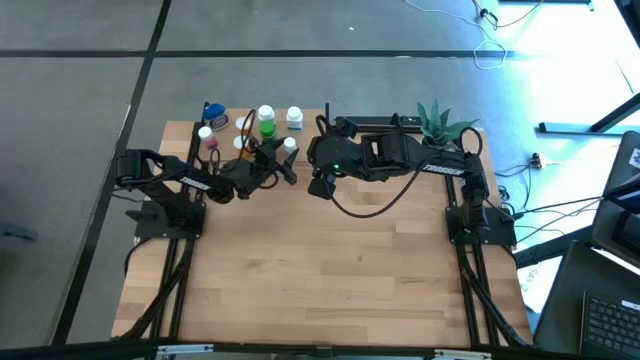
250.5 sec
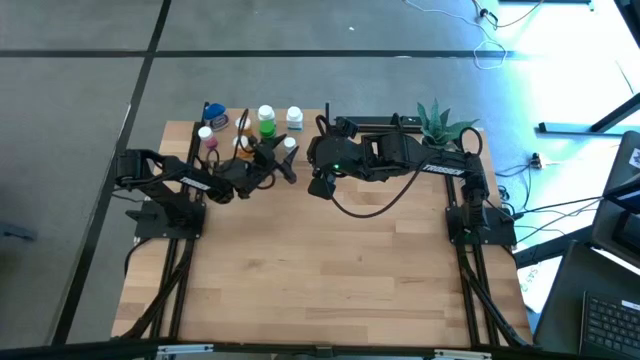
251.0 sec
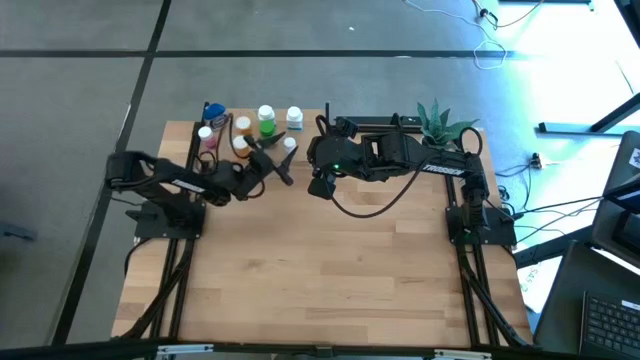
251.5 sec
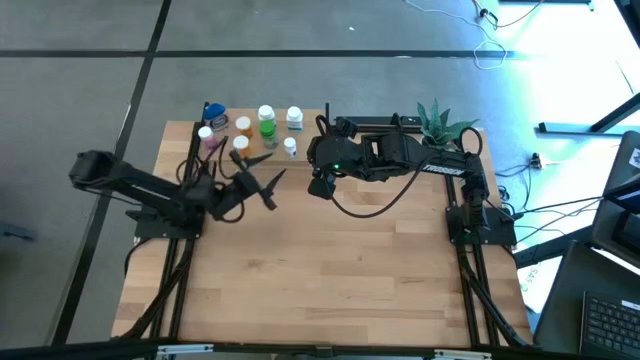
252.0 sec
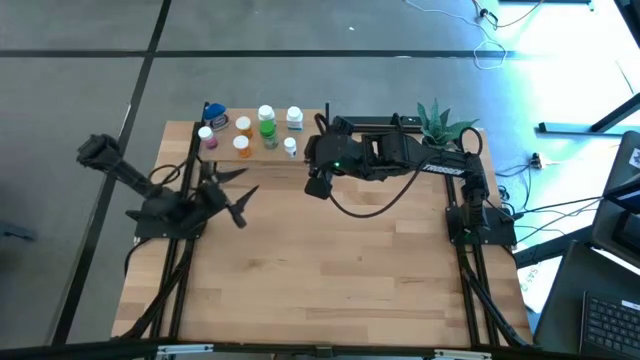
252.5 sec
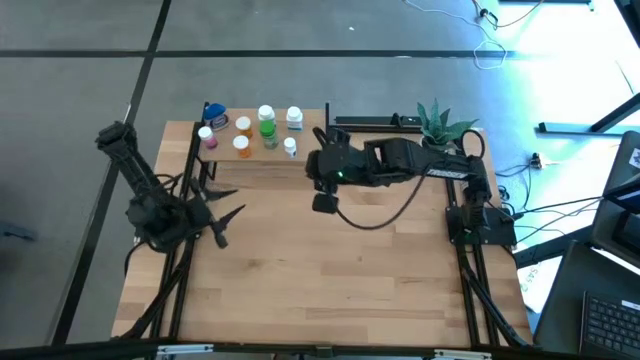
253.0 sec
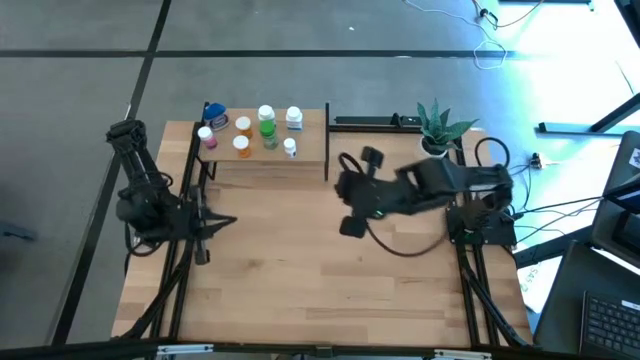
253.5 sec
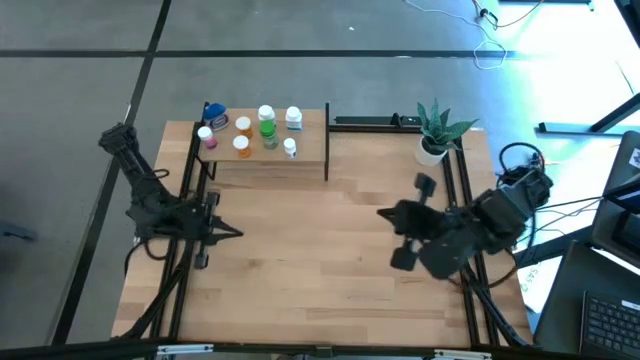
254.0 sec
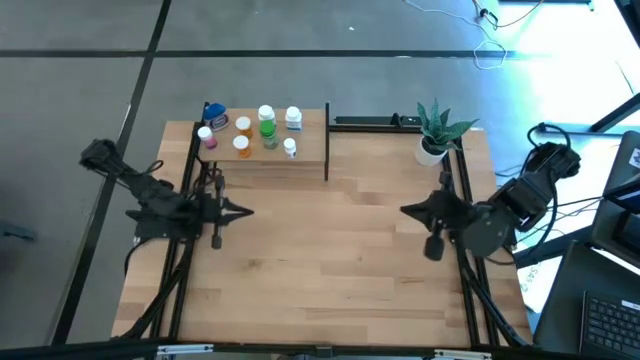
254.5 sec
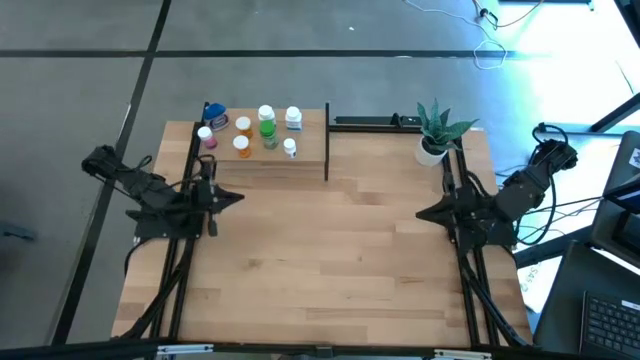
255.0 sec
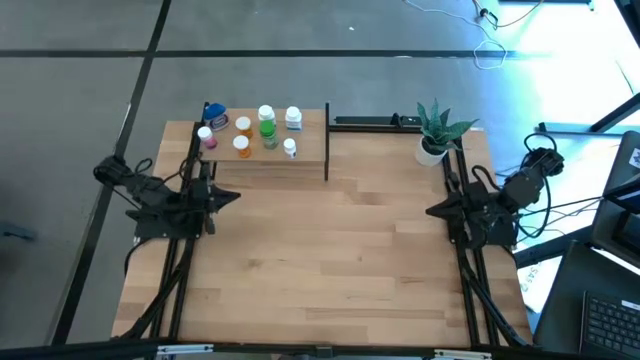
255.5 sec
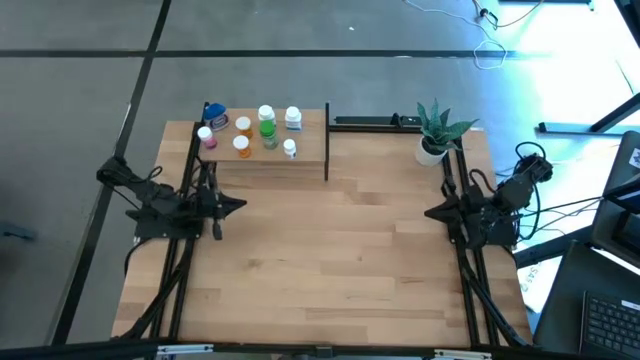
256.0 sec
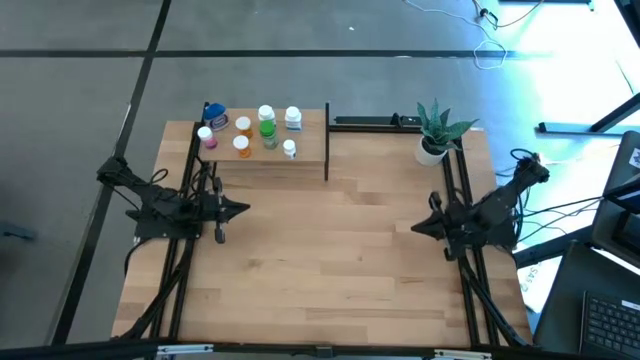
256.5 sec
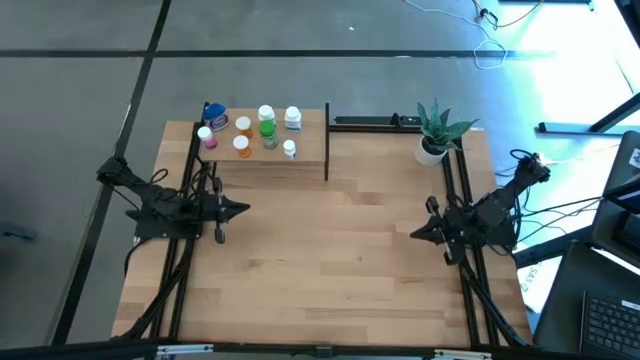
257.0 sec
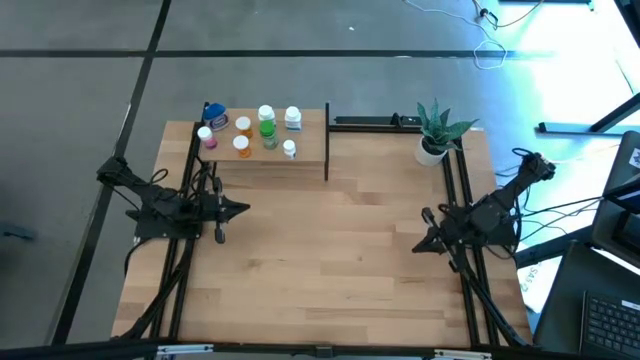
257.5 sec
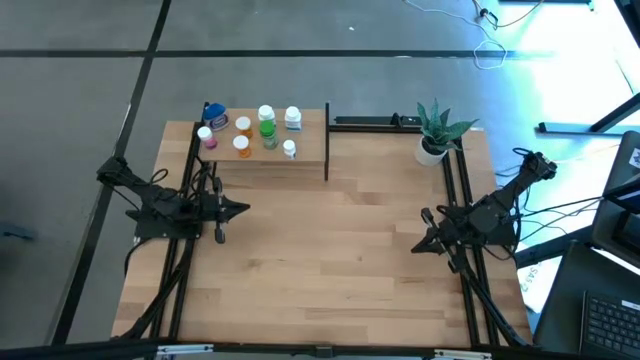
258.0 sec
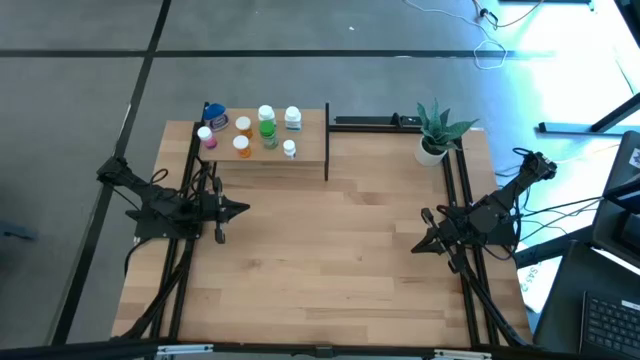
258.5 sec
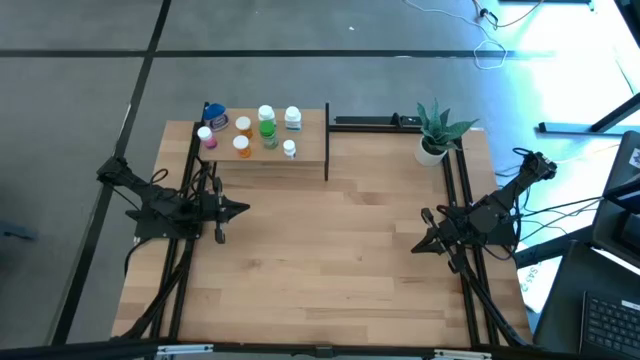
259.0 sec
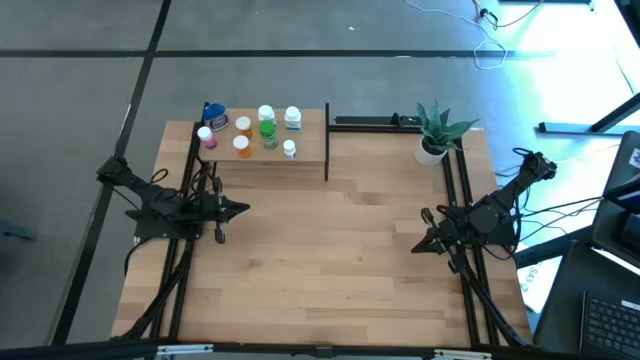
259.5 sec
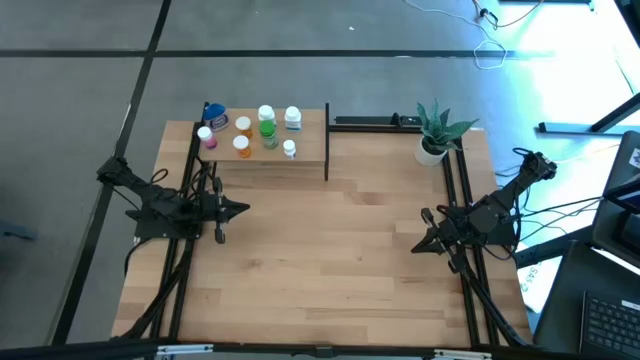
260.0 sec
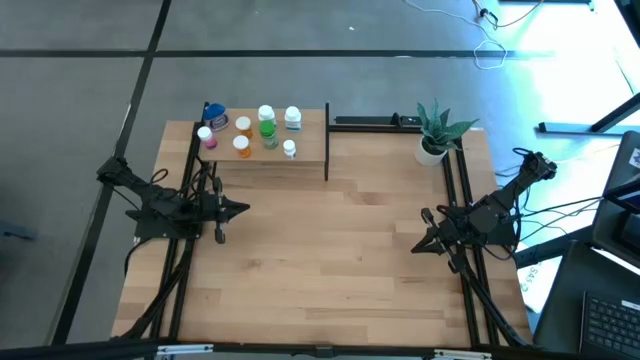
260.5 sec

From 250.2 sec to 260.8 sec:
Task: Pick and place medicine bottles onto shelf by color
Return to Home Position

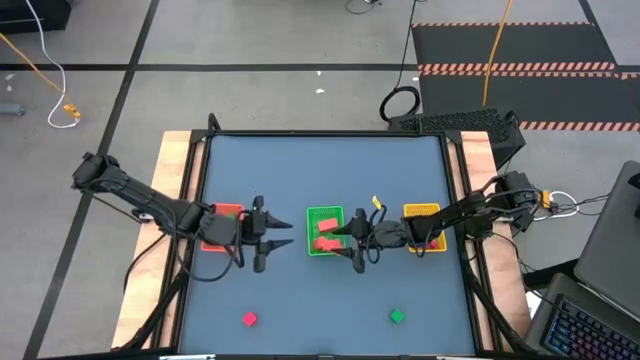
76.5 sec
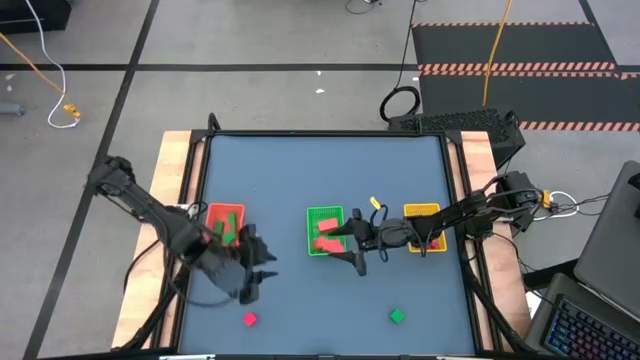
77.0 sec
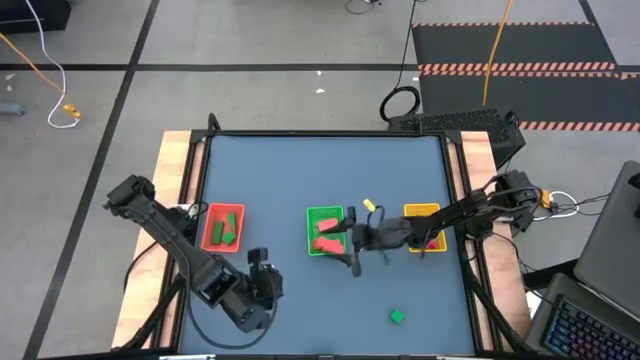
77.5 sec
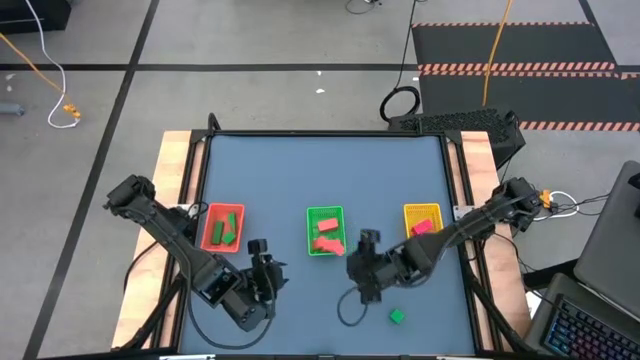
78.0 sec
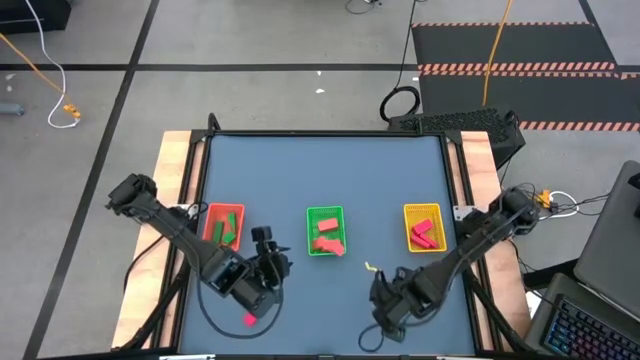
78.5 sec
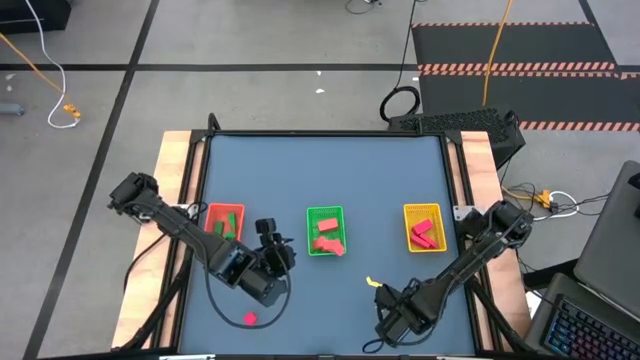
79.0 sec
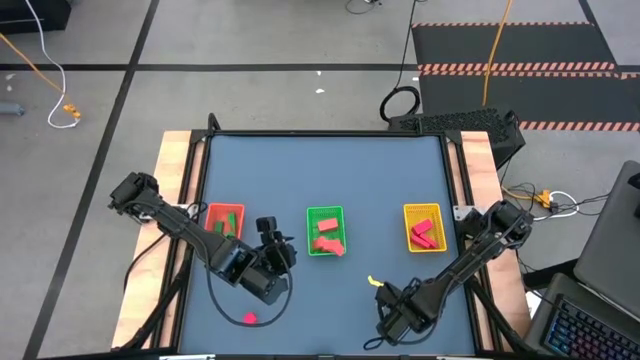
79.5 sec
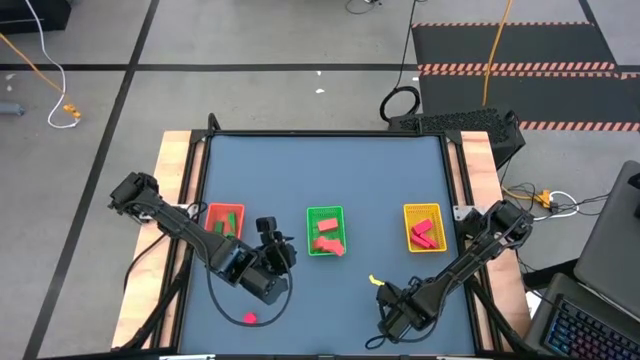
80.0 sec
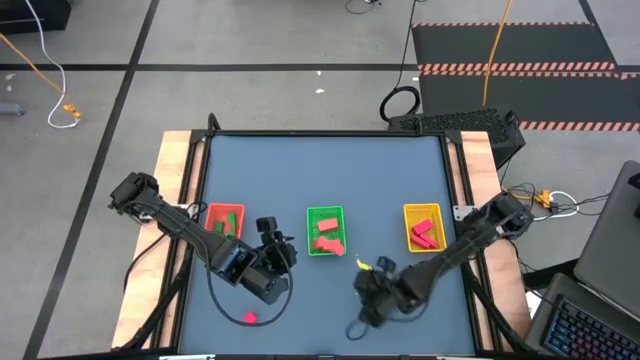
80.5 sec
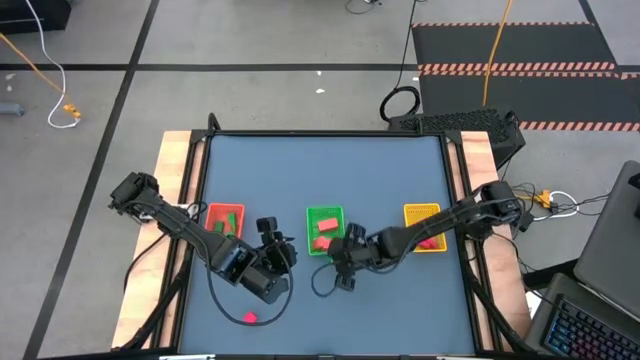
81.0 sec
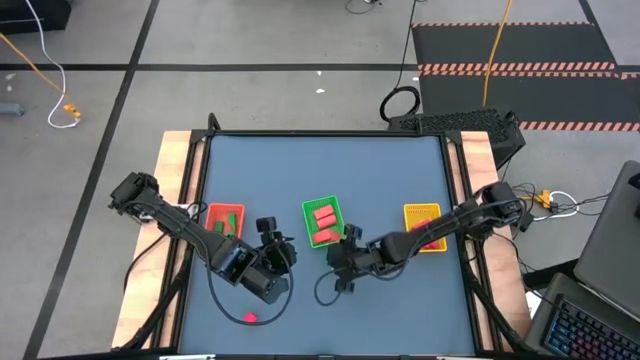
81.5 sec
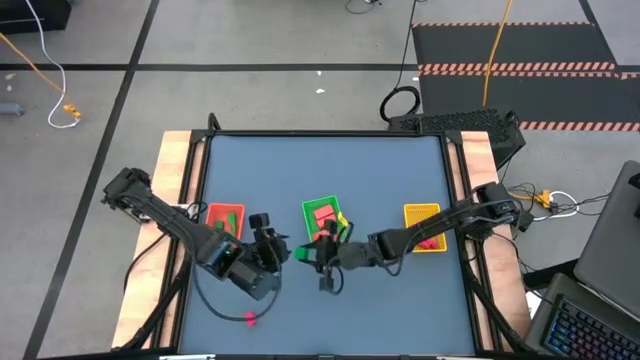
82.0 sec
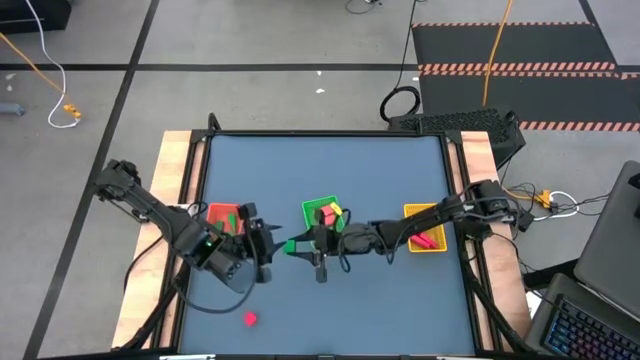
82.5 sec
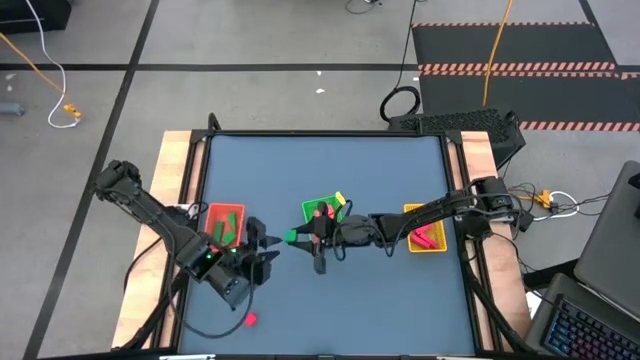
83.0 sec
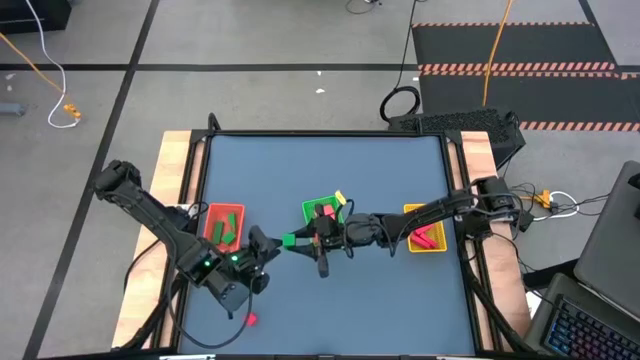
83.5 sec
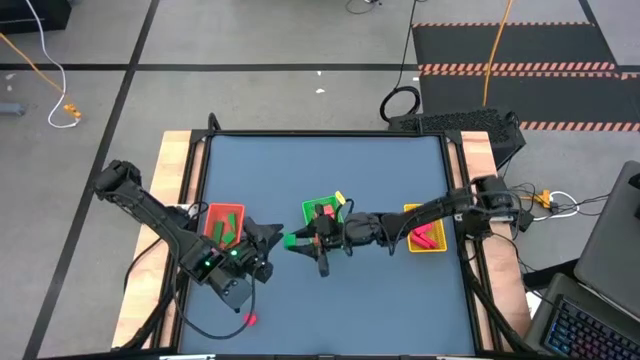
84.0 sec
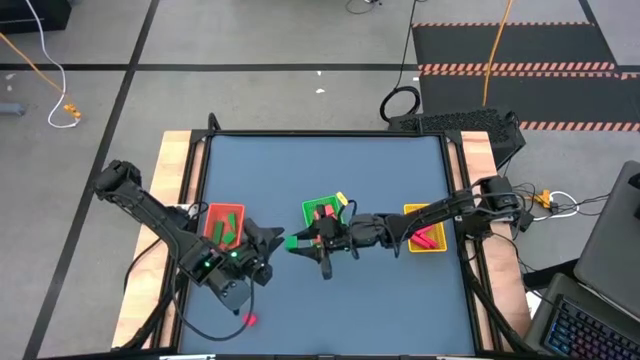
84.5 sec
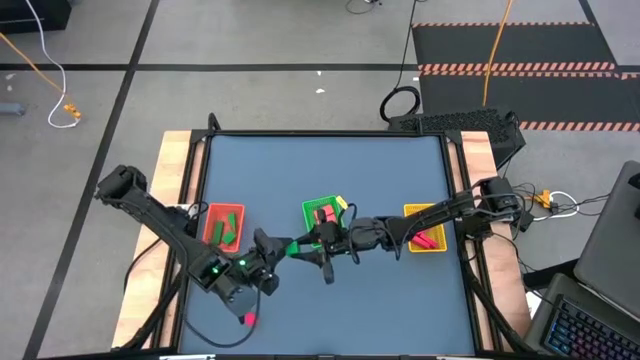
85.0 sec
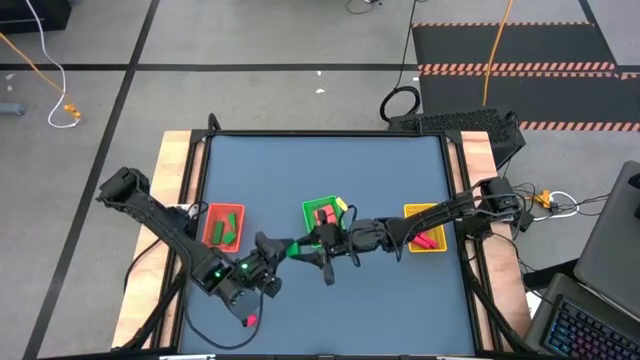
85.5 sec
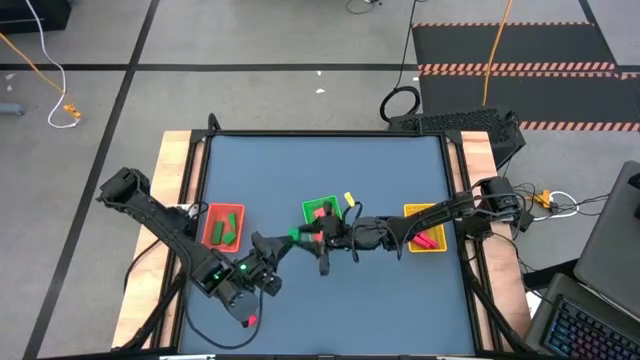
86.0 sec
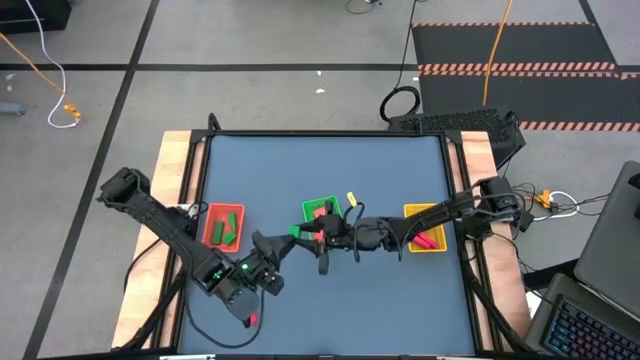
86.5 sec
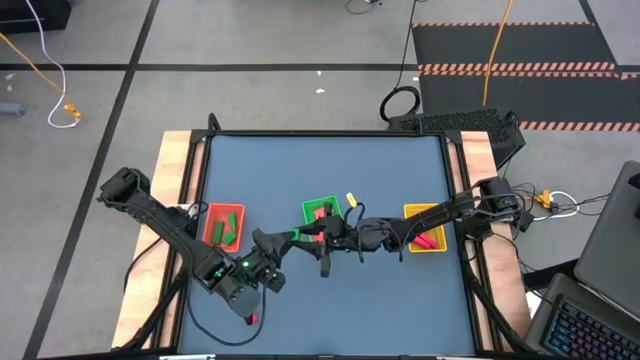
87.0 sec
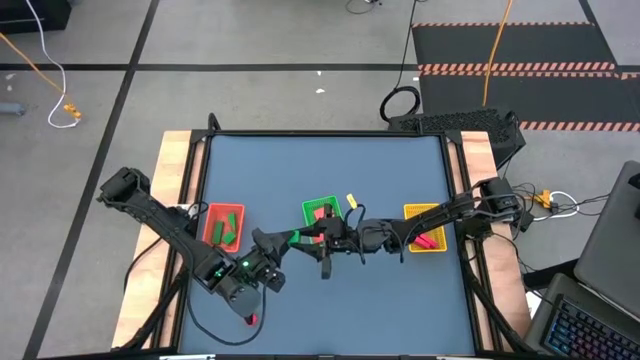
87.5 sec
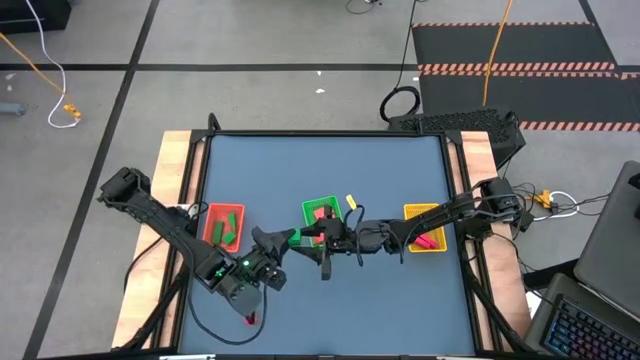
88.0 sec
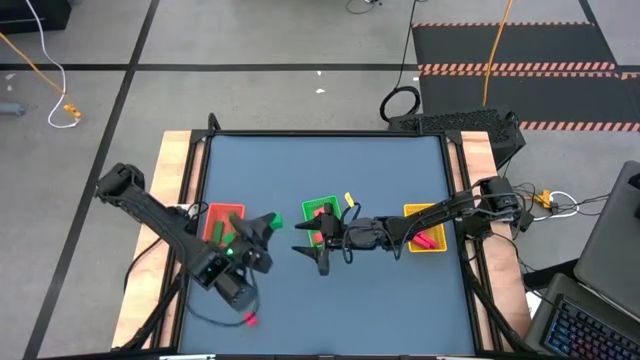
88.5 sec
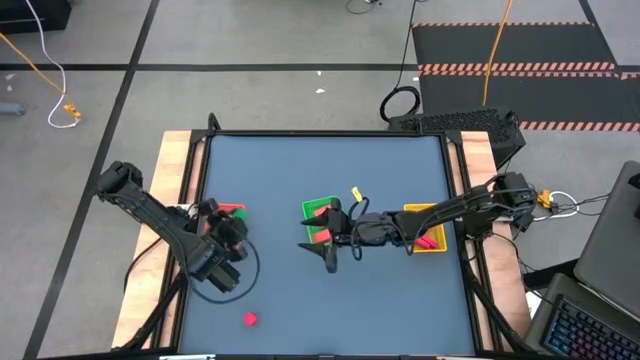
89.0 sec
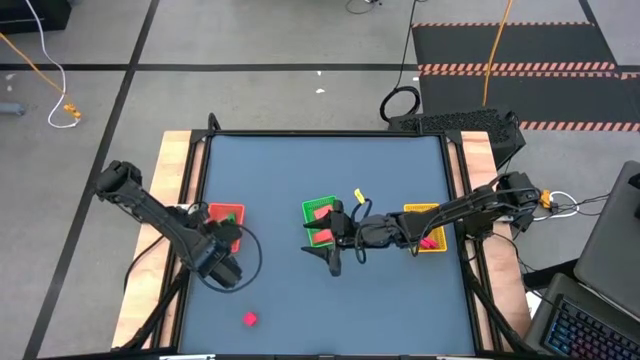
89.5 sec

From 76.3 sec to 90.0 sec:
Task: Sort & place blocks by color
Put the green block into the orange bin
